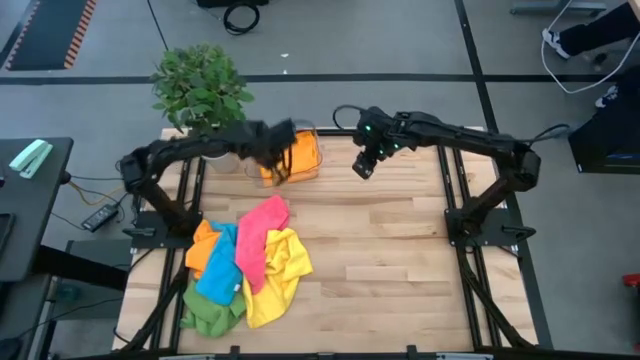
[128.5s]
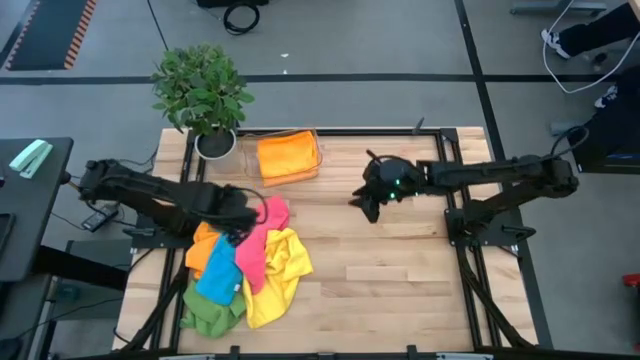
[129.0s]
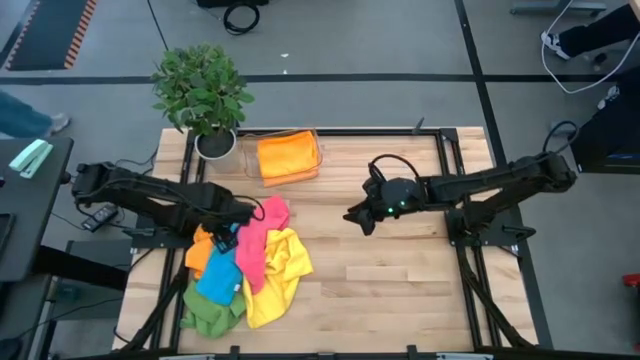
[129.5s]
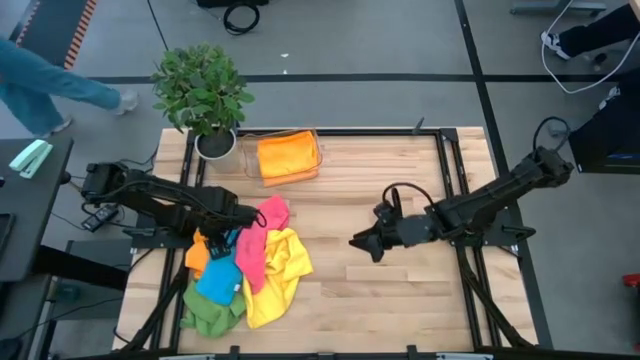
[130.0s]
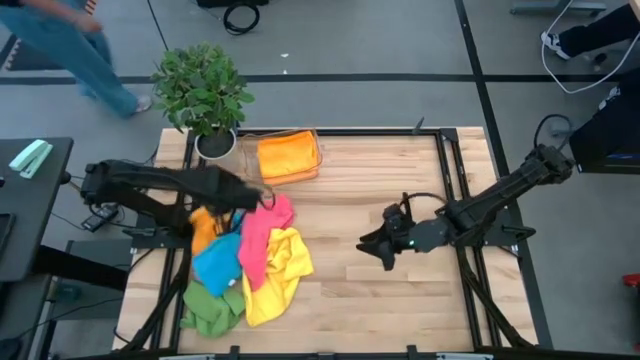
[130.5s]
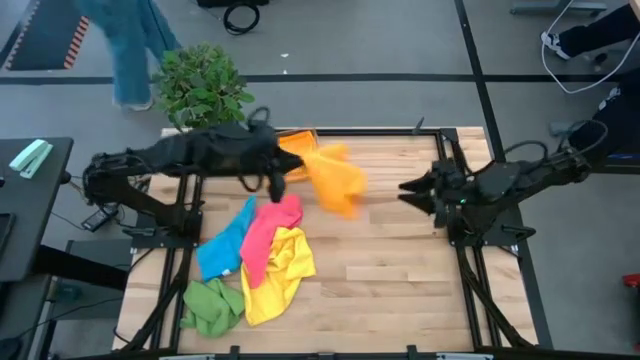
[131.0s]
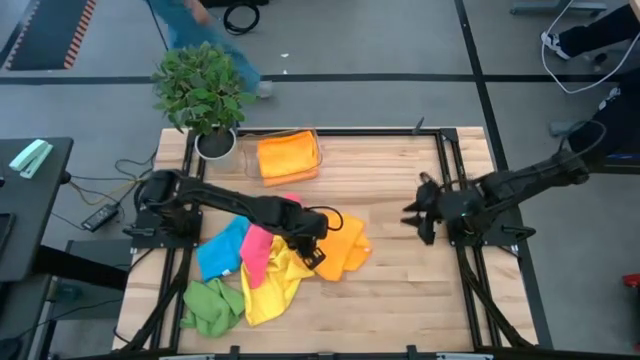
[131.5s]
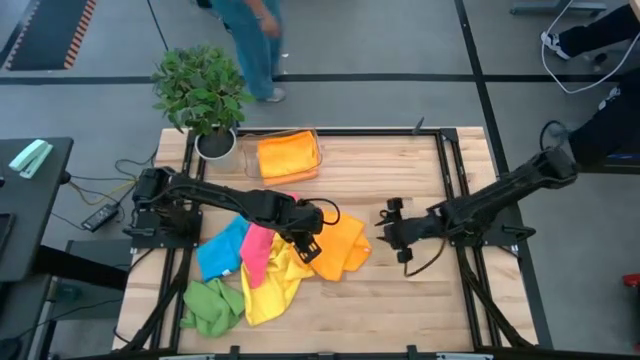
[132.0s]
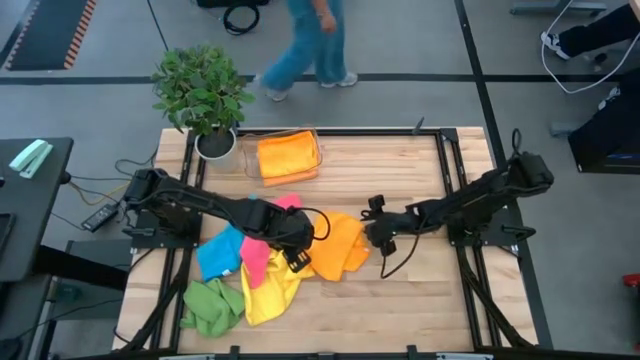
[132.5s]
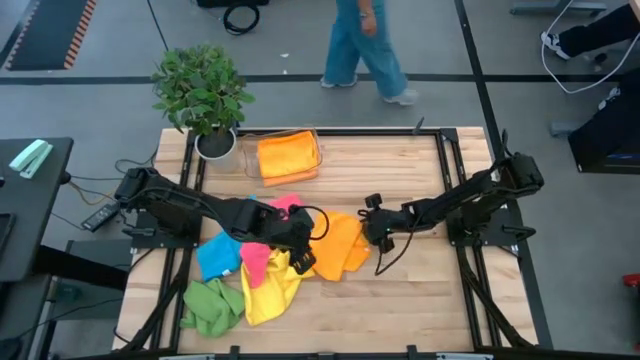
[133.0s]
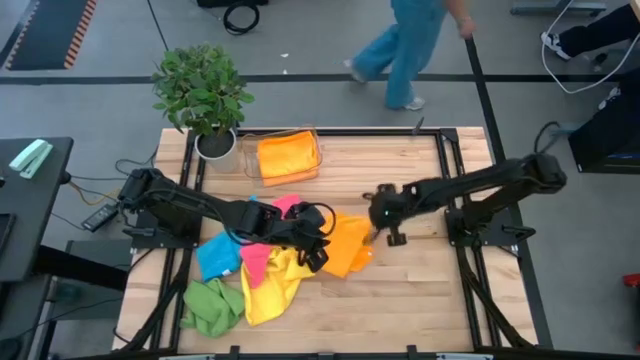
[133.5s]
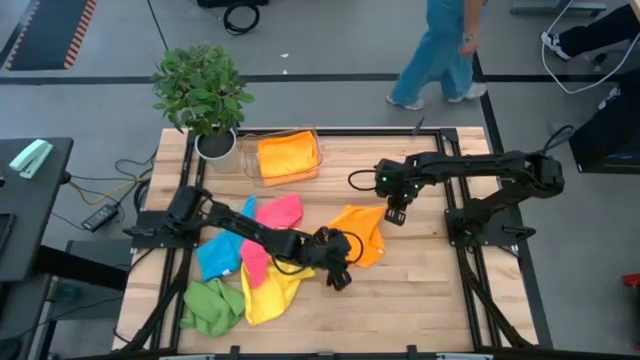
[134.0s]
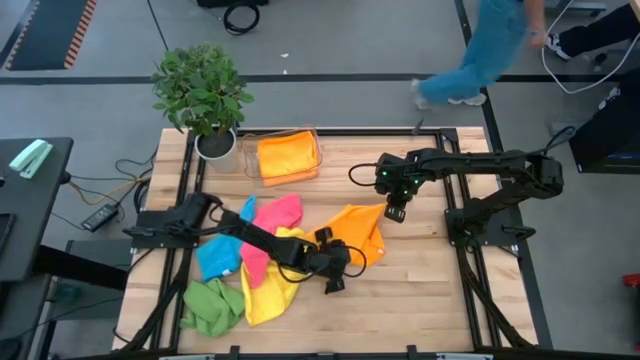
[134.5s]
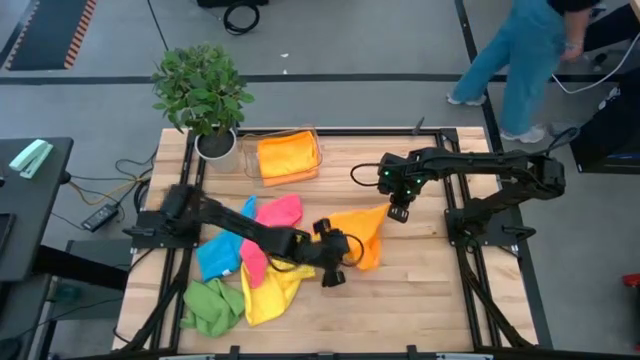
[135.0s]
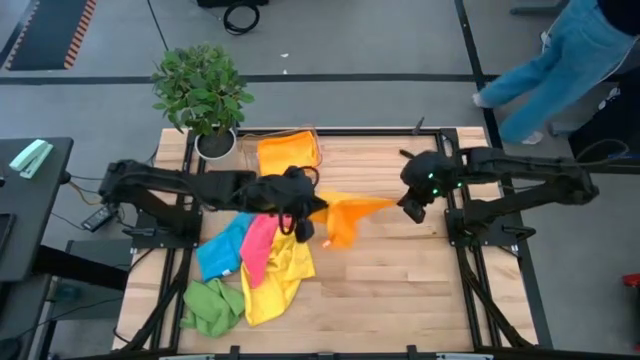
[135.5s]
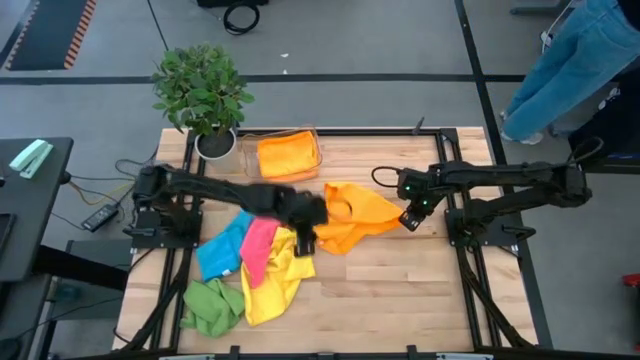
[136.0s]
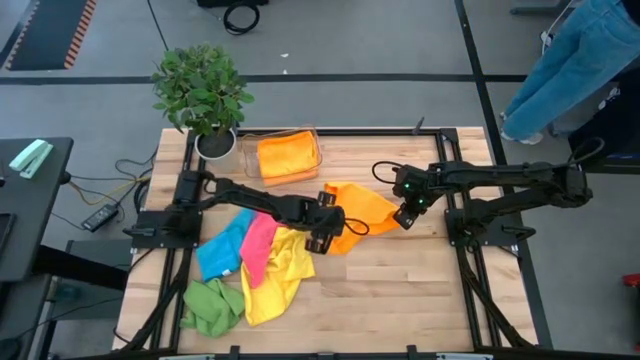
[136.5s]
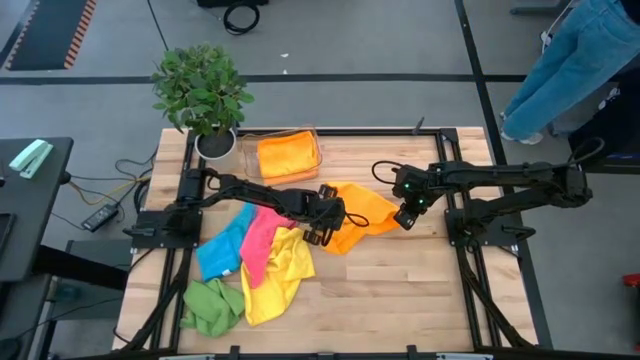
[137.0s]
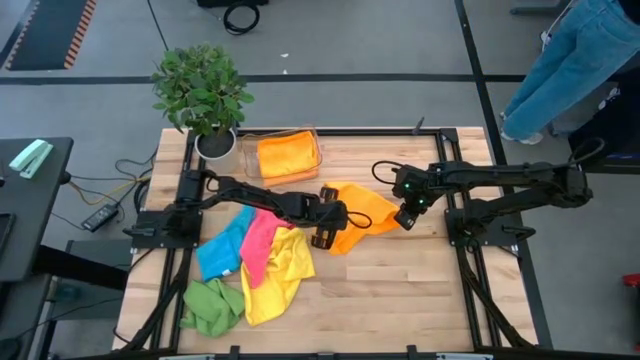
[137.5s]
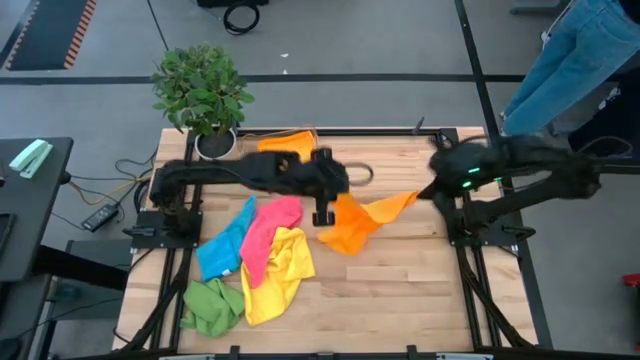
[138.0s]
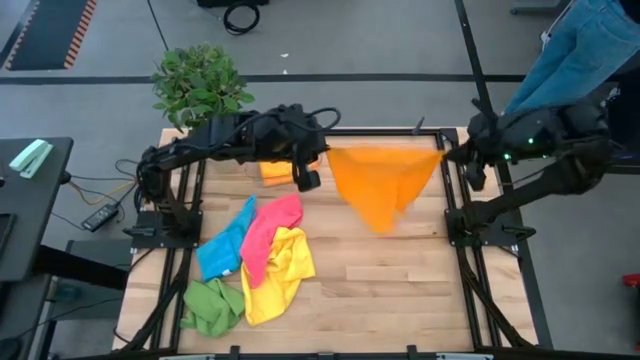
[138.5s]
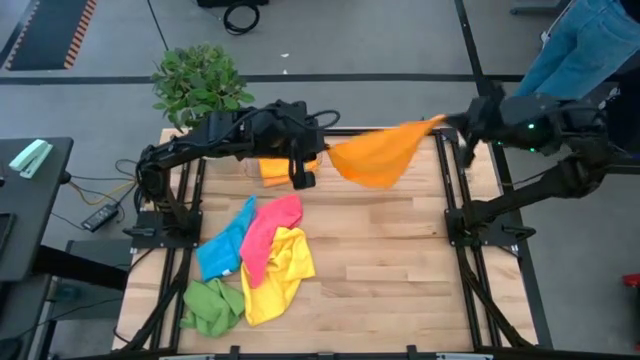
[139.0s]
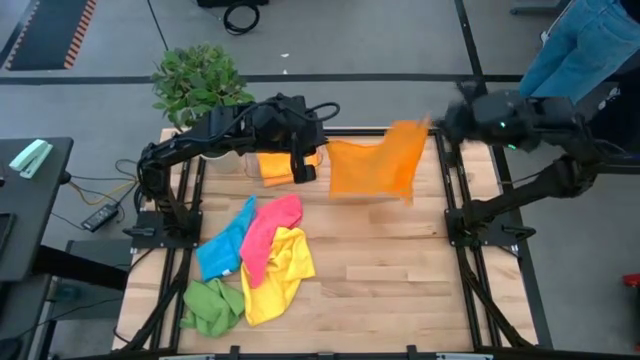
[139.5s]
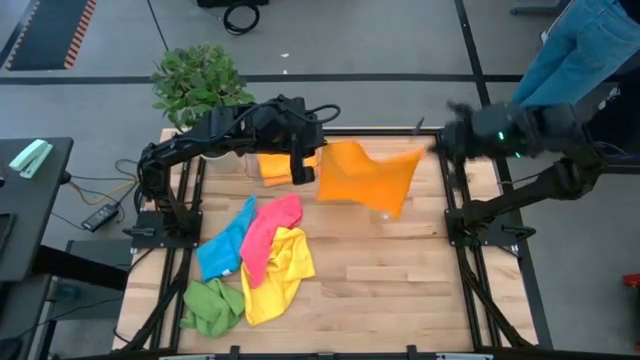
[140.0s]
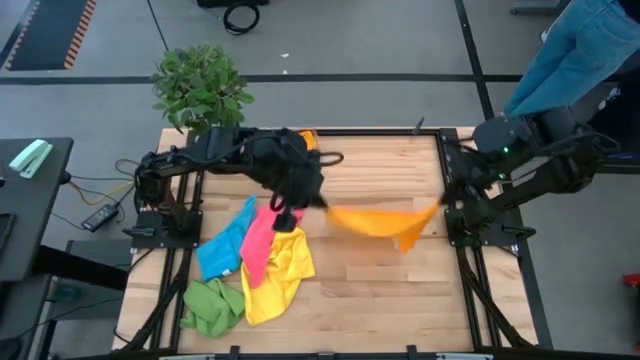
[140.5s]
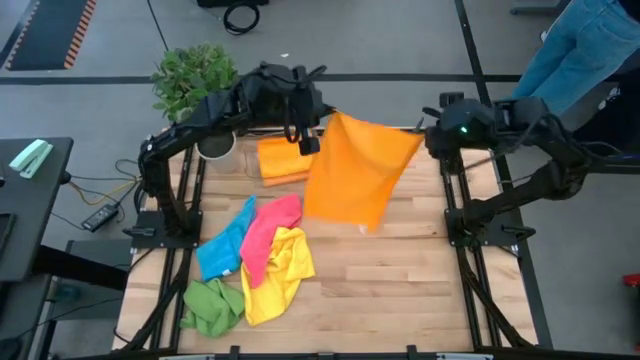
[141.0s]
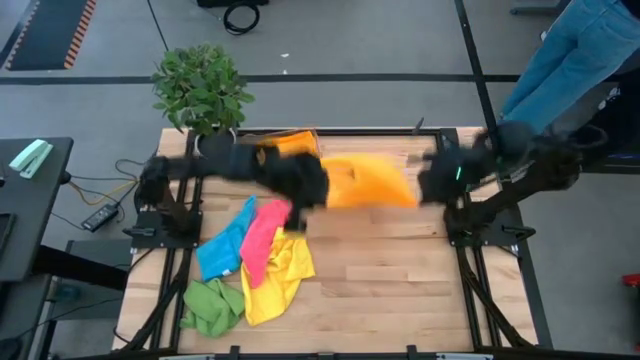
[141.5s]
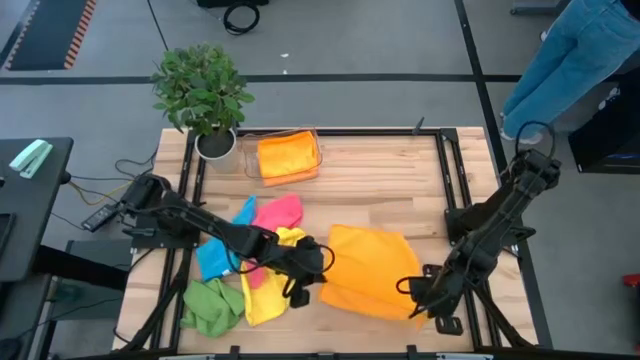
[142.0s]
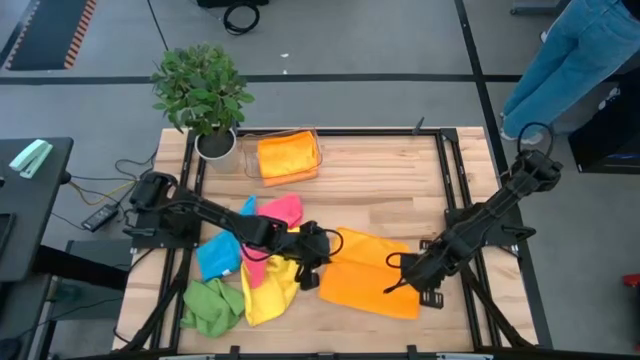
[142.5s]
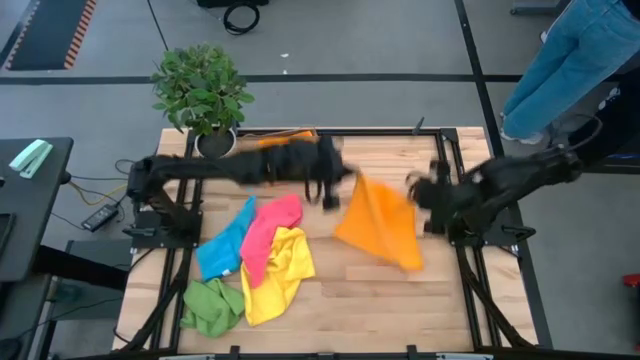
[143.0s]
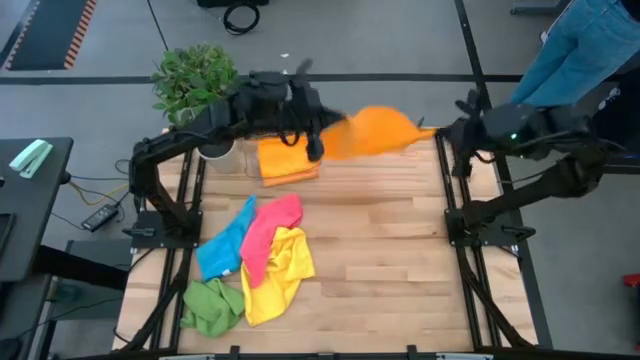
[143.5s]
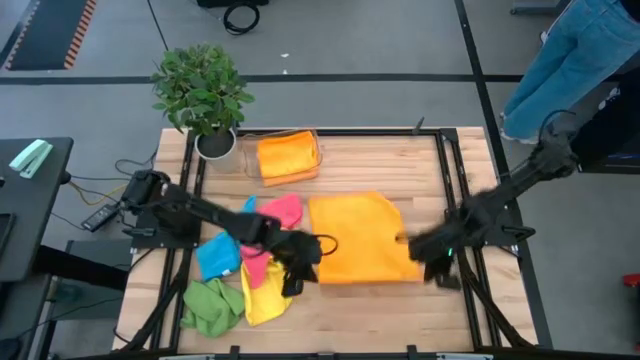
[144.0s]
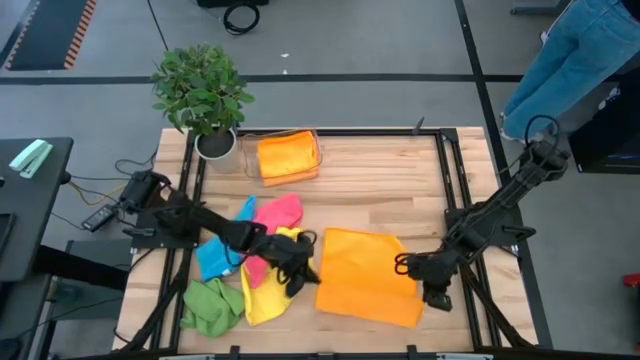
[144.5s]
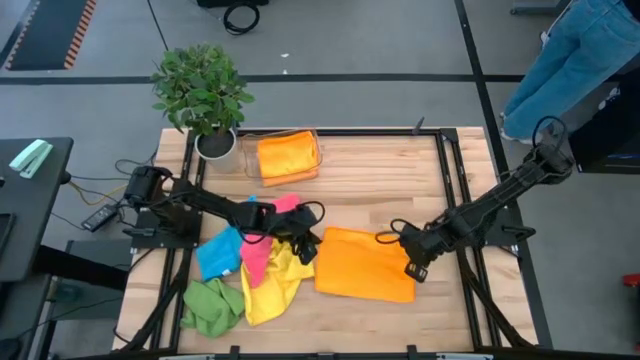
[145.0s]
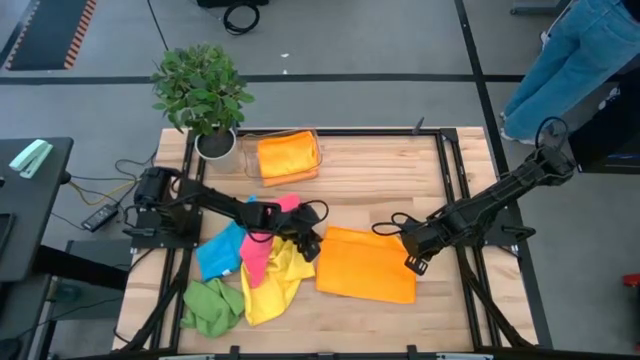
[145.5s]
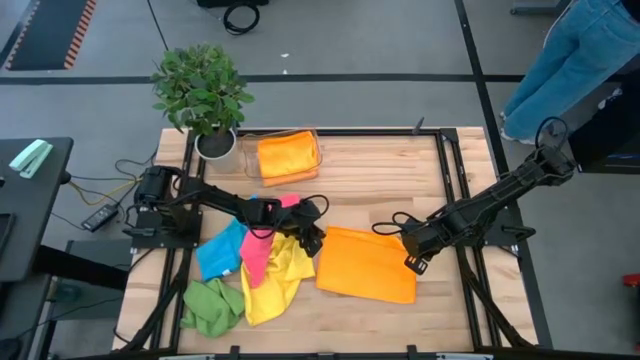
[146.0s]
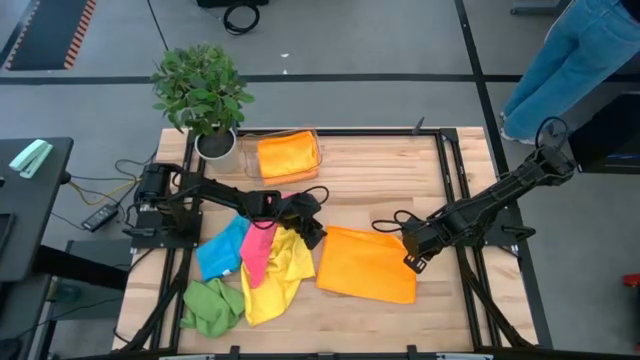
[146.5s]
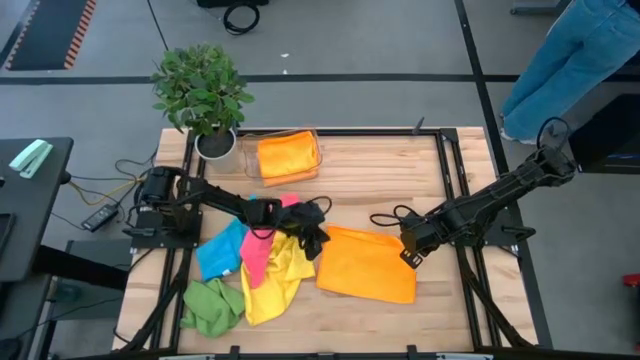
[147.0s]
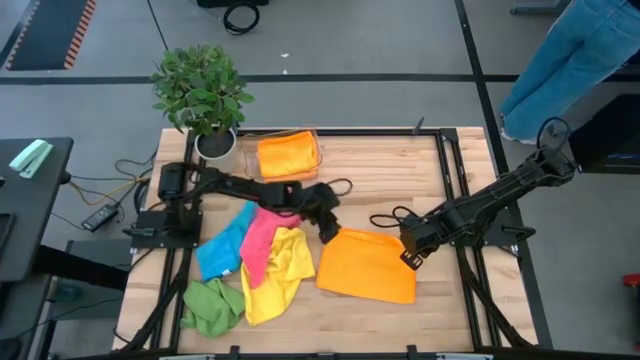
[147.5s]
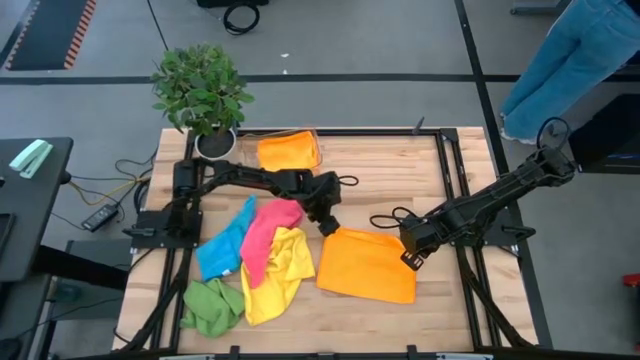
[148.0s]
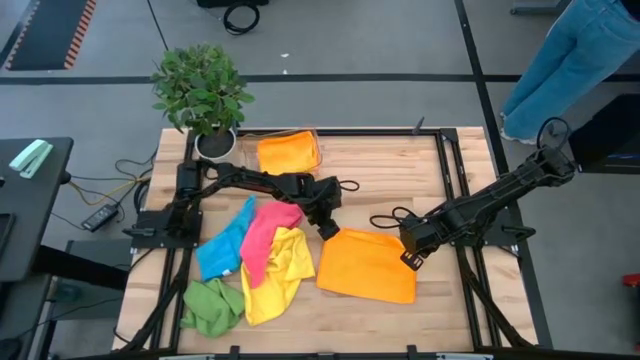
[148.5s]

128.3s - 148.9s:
Task: Fold microfiber towels
Fold the orange microfiber cloth

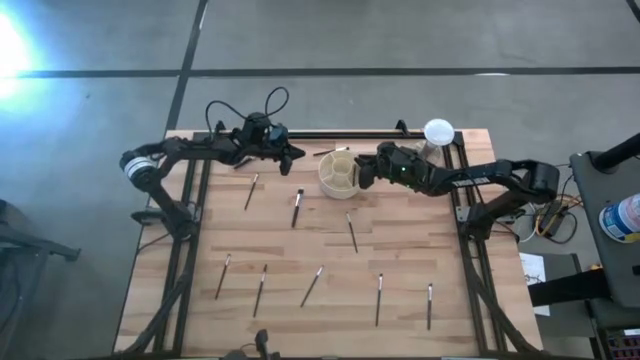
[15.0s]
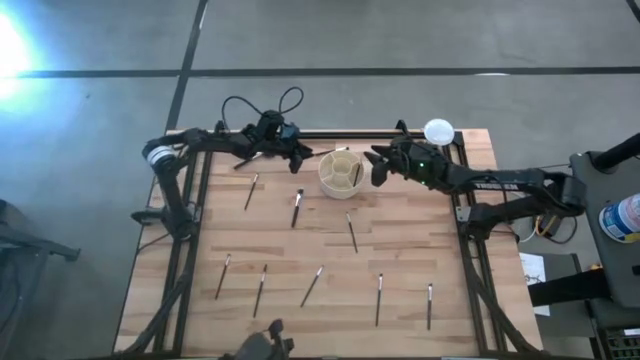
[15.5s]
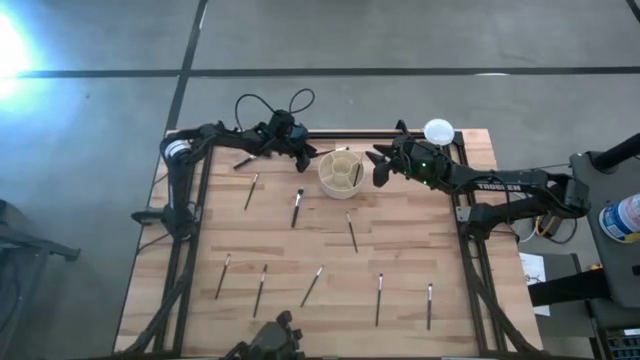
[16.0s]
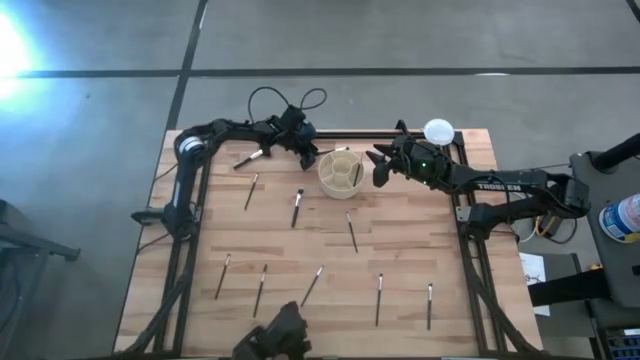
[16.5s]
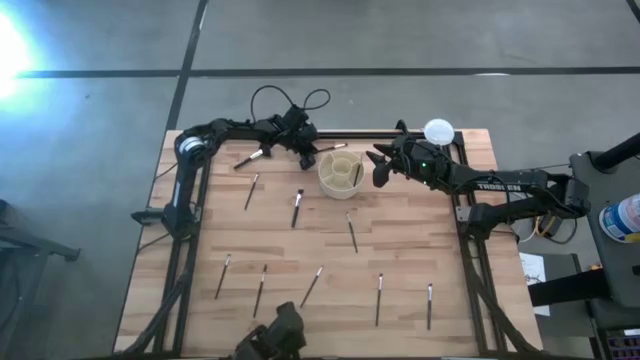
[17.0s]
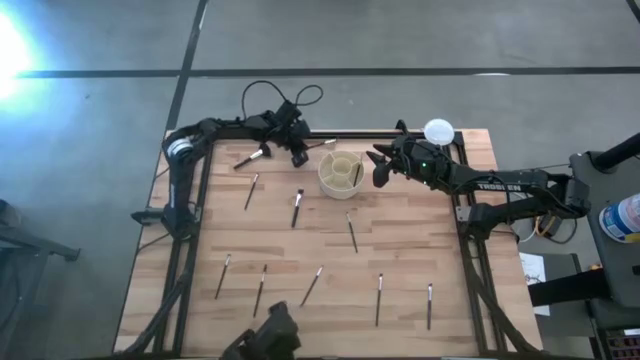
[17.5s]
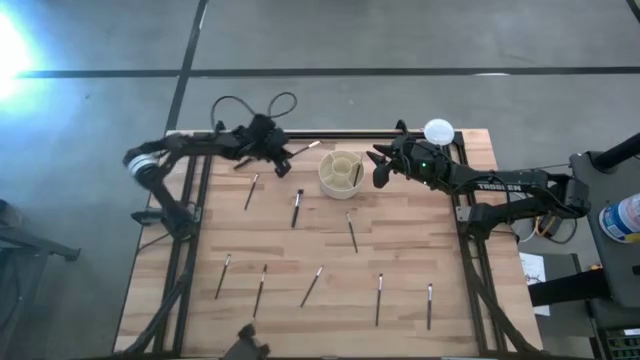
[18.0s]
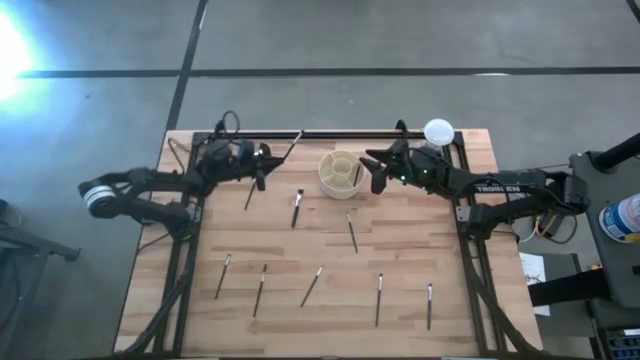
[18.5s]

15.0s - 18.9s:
Task: Put items in baskets/containers
Put the black silver eyeshadow brush into the pen organizer
